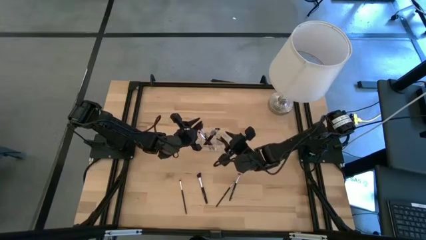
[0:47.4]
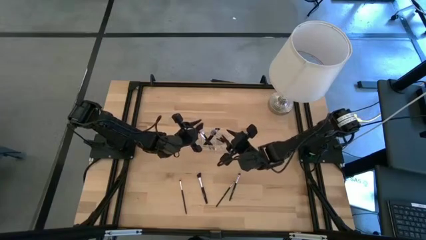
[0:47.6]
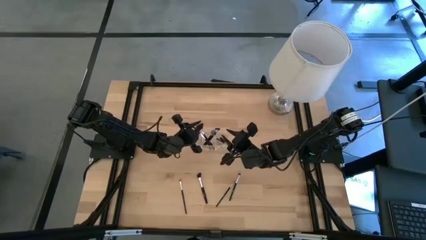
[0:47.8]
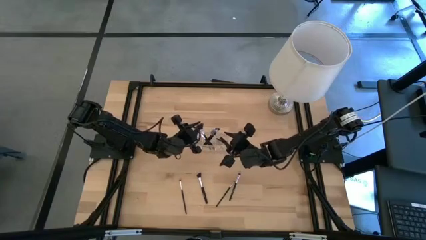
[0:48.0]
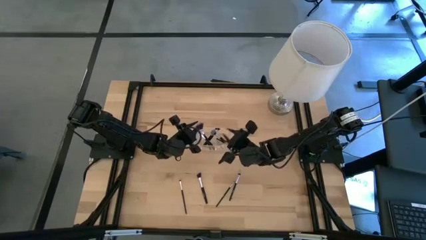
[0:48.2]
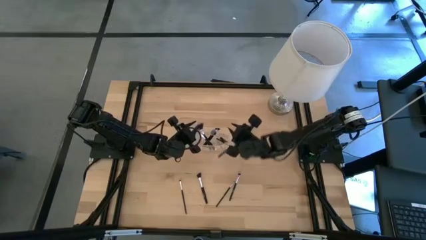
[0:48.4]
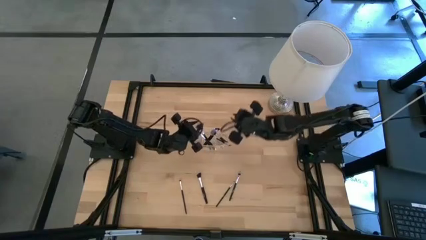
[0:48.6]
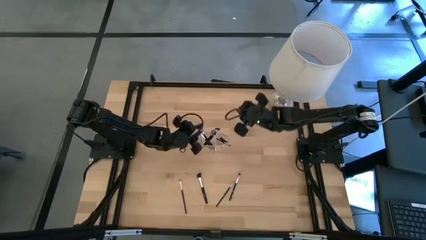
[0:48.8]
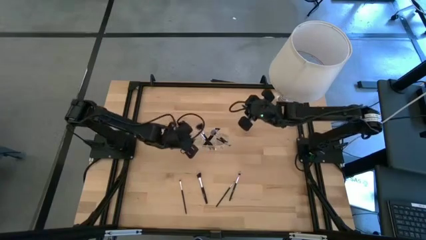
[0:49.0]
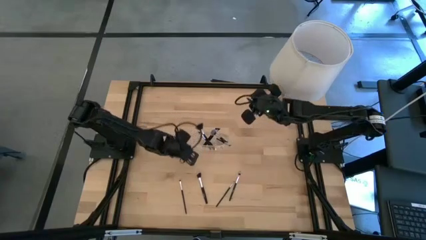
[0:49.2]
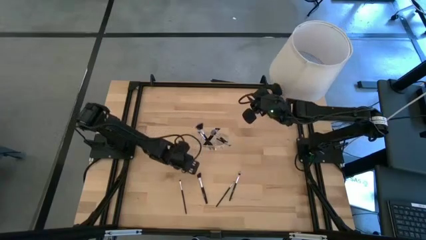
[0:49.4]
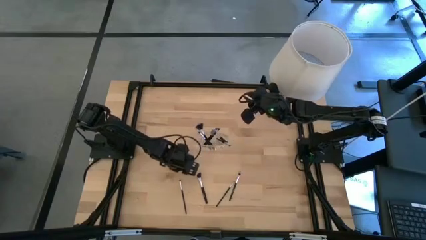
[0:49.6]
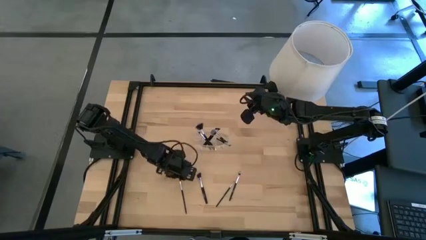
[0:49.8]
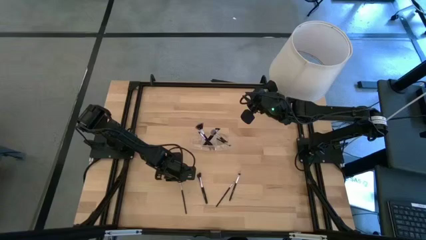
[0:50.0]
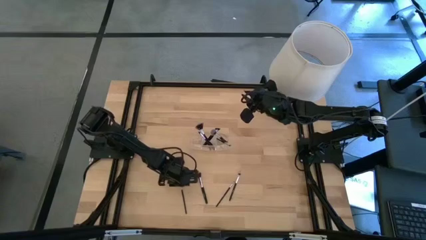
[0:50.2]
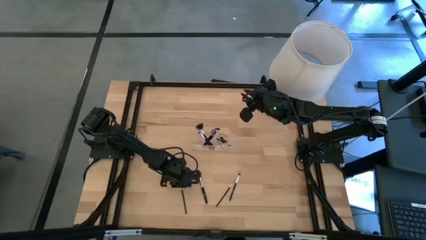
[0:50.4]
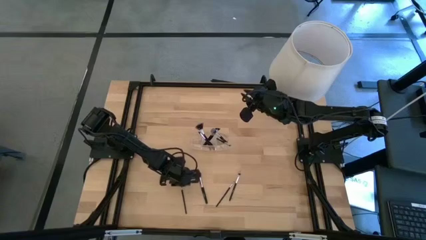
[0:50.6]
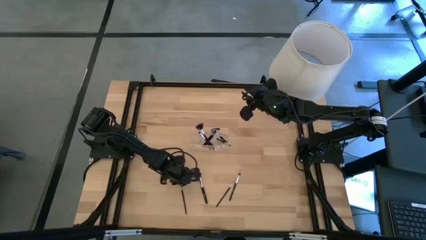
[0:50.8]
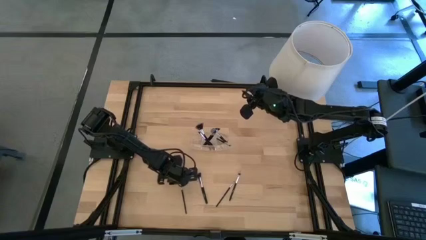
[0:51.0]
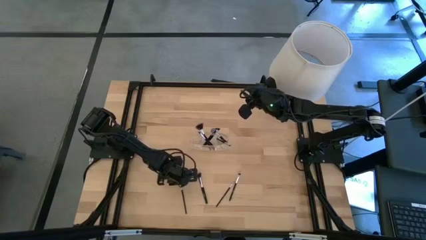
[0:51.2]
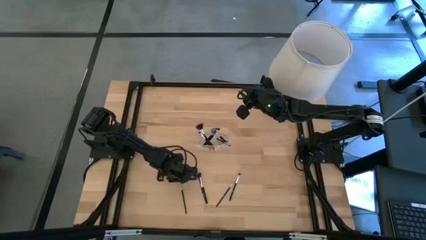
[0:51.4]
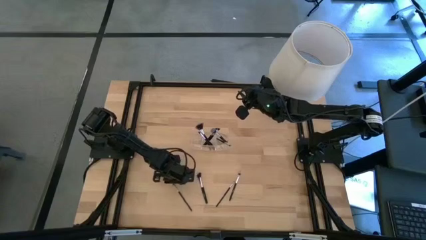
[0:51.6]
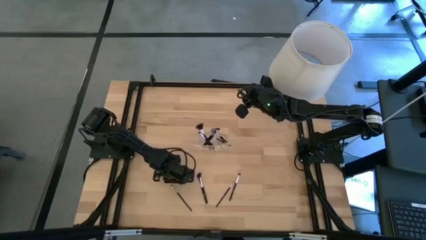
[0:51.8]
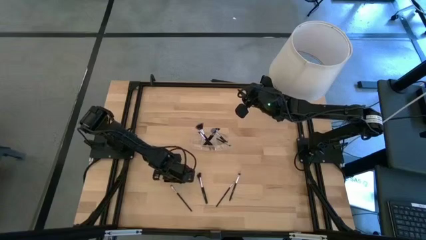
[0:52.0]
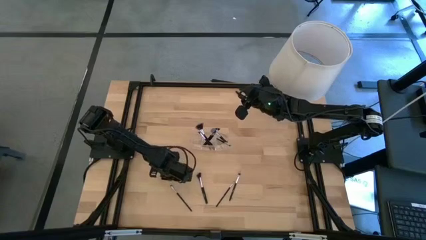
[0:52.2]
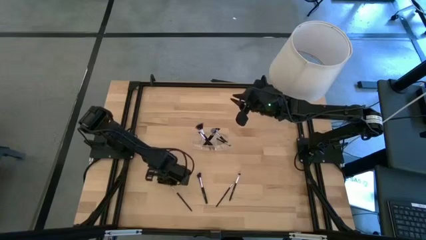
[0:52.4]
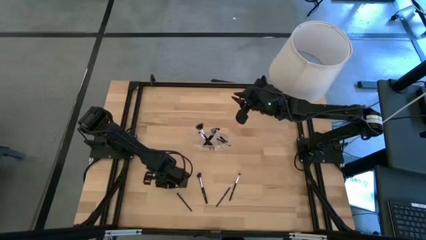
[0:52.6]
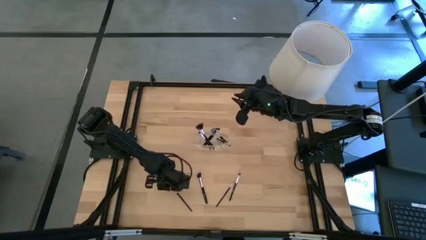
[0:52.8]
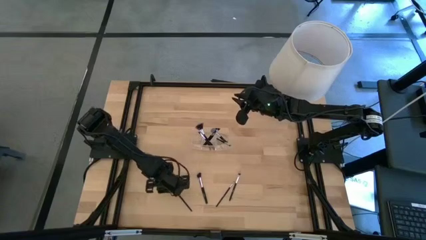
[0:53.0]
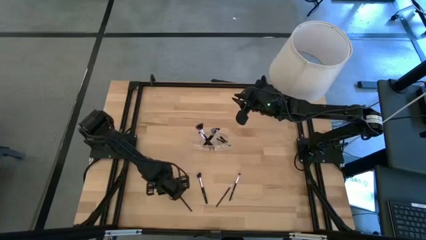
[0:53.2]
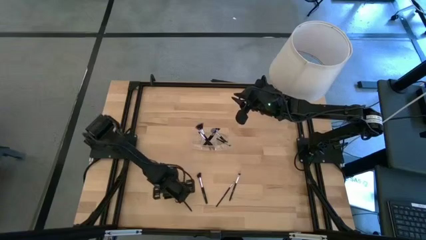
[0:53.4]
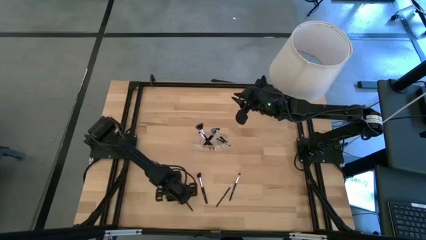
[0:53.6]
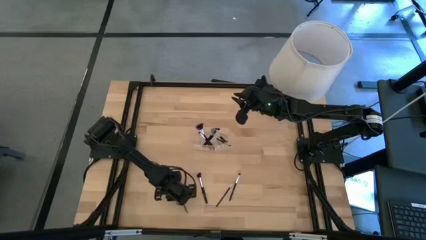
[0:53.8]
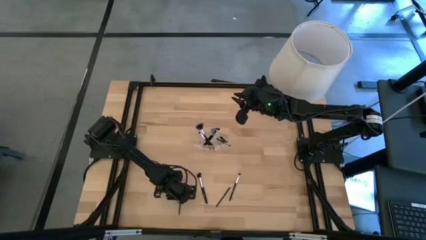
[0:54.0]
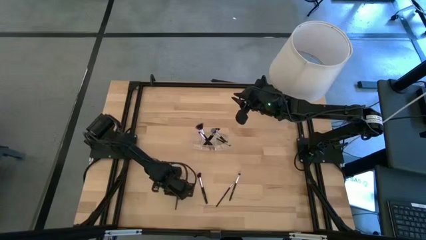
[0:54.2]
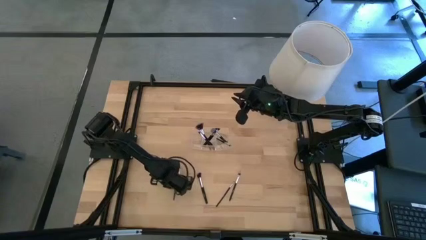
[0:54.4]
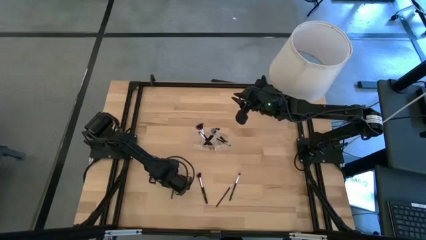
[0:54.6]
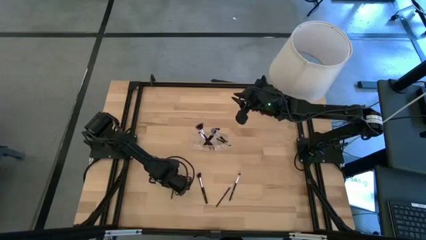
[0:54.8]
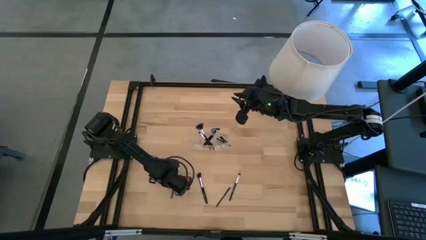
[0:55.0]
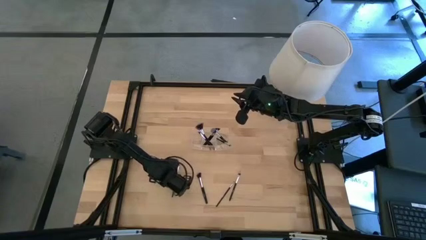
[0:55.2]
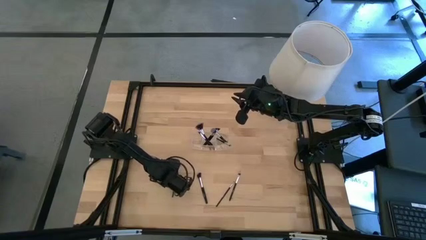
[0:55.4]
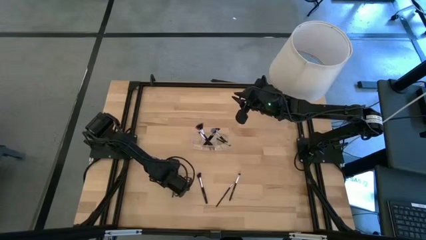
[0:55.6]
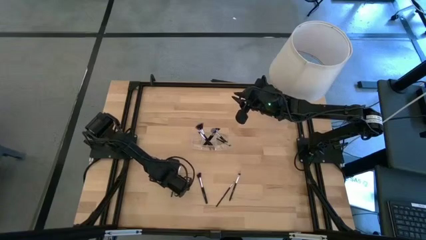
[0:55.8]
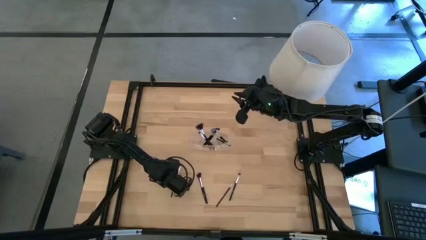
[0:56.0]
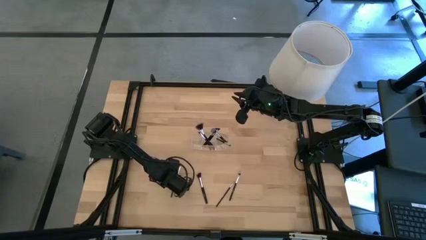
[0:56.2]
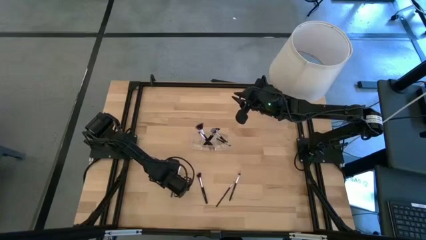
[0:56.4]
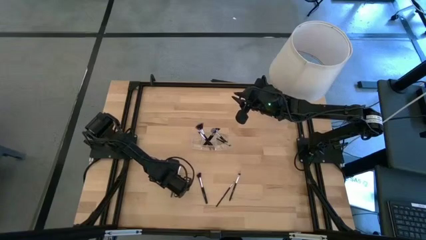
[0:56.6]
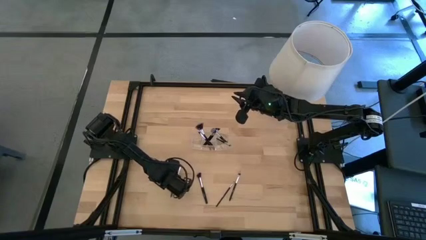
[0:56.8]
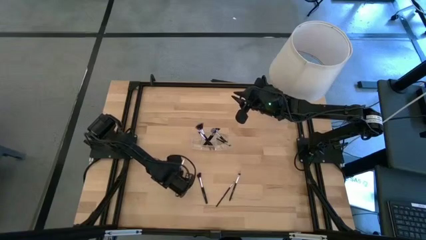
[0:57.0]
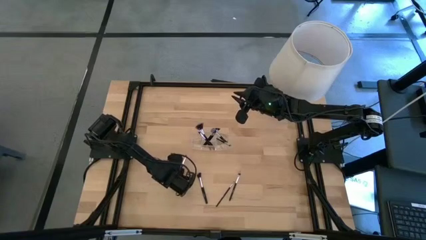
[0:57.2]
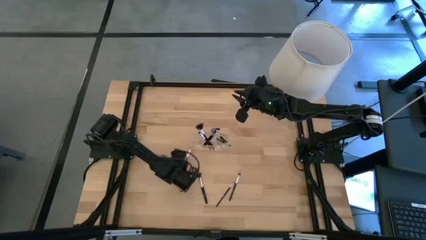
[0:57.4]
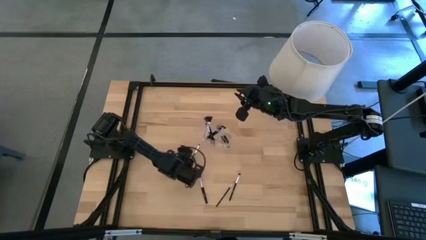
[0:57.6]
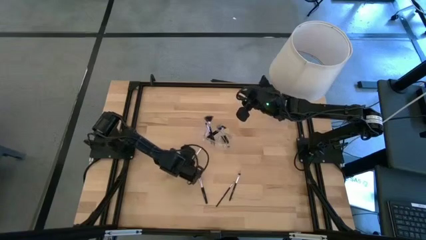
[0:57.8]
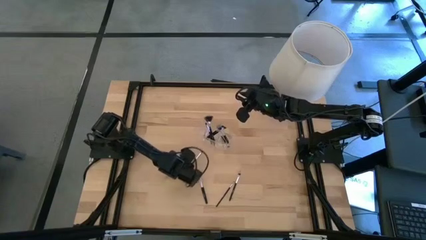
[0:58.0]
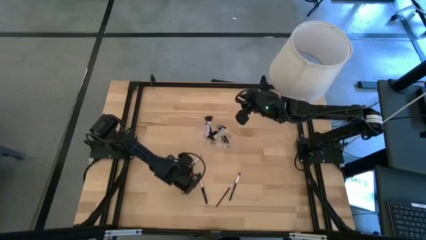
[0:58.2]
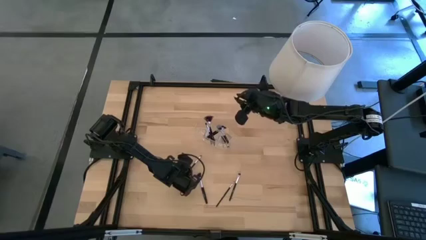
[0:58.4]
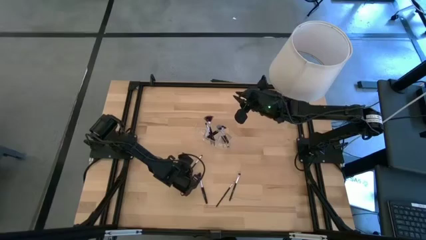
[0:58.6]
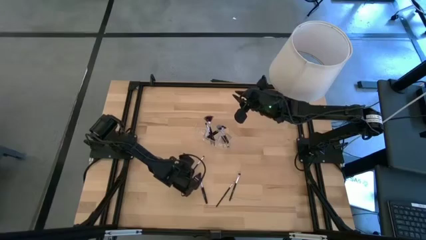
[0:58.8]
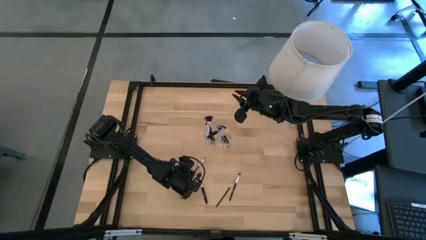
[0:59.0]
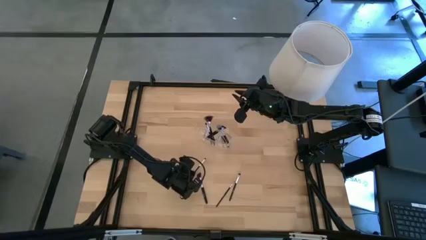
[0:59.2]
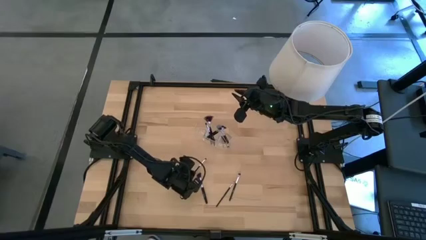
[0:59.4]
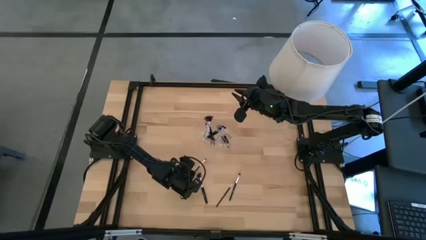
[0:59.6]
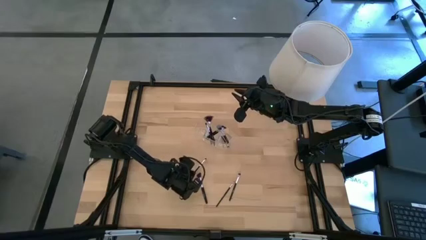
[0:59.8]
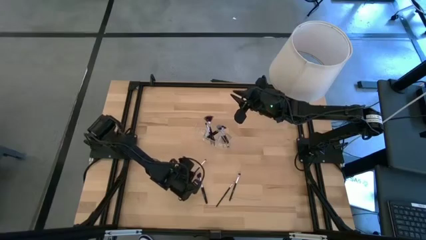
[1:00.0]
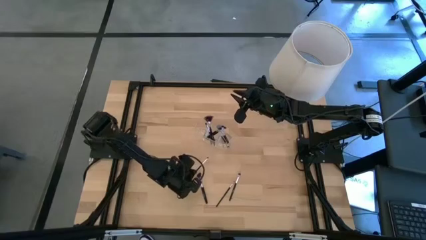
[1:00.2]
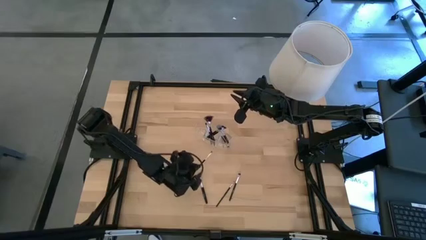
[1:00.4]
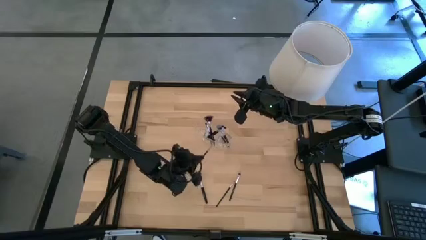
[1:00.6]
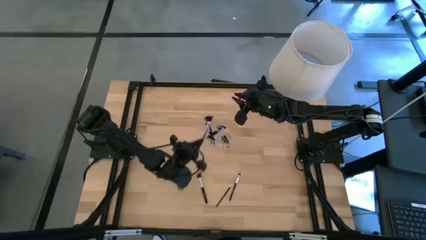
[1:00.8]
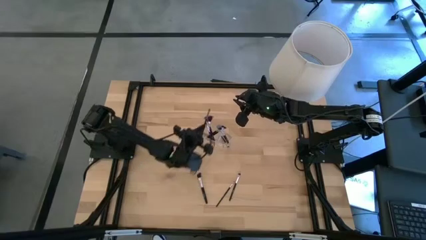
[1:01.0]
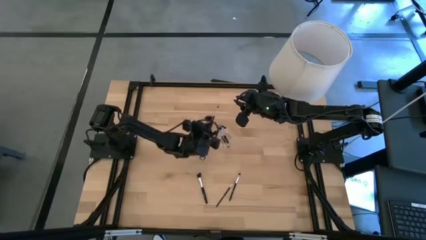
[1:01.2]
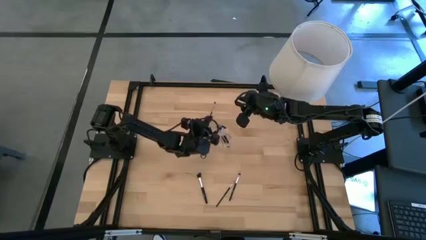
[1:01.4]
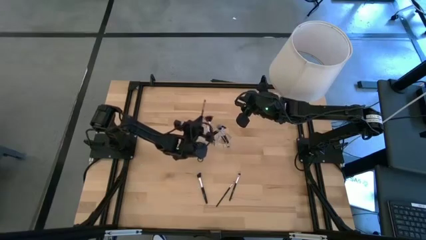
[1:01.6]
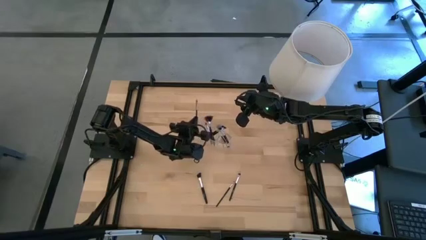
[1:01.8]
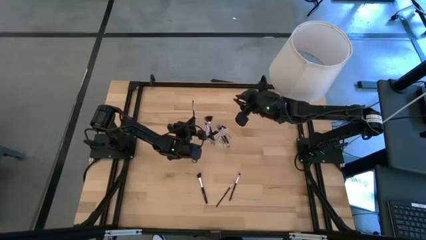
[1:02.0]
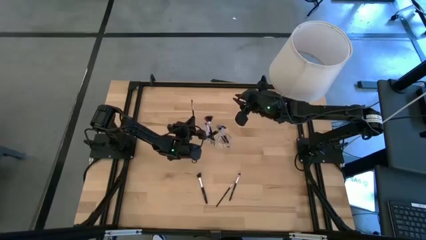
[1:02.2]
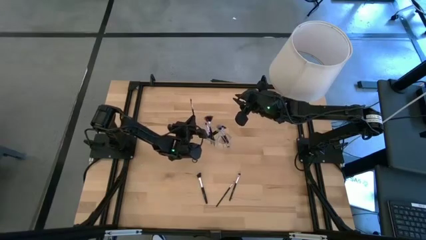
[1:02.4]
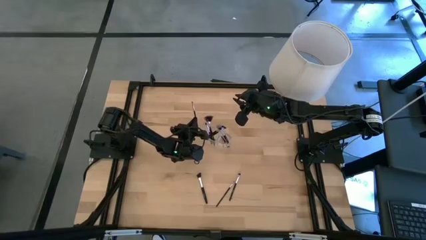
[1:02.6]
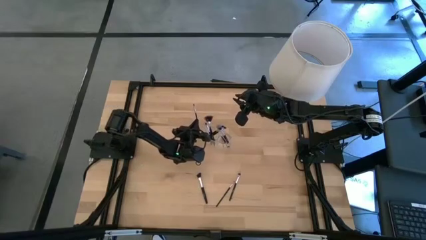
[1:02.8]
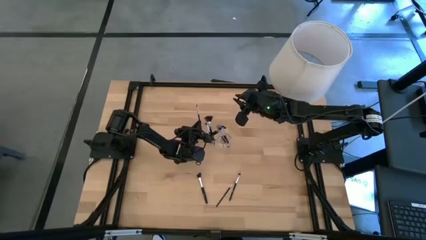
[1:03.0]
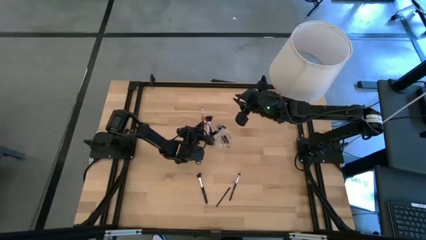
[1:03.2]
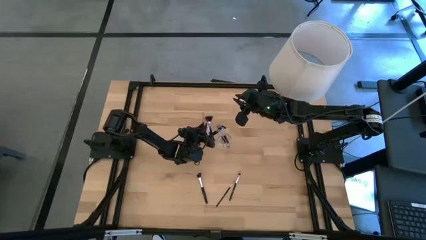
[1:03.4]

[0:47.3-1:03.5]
Task: Put items in baskets/containers
Put the eyeshadow brush into the transparent organizer
